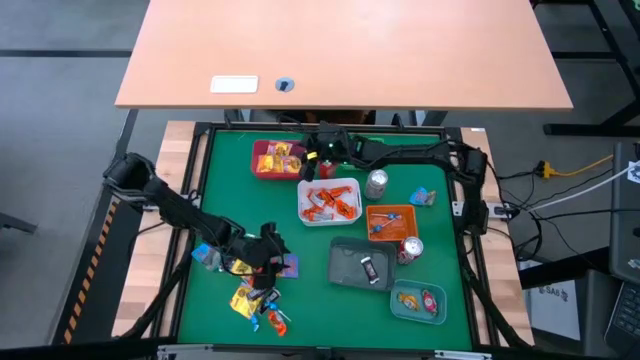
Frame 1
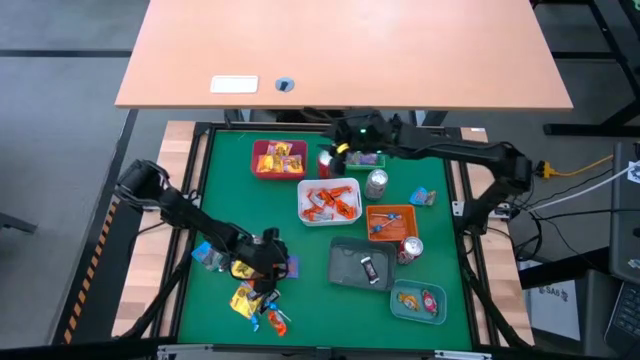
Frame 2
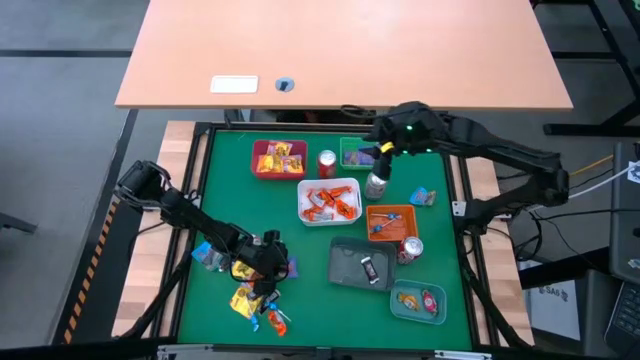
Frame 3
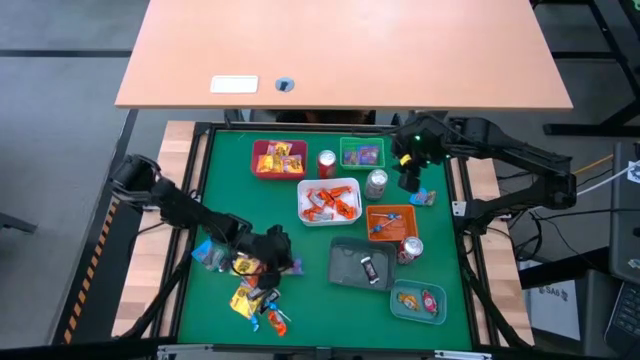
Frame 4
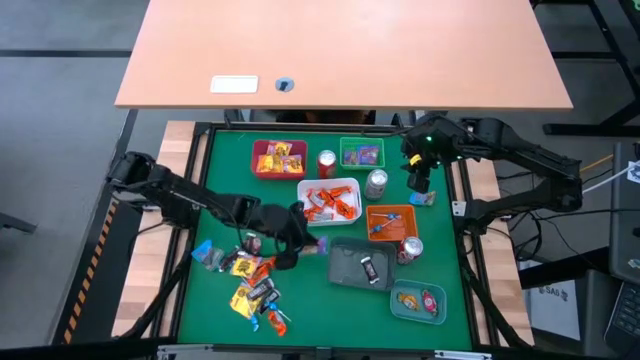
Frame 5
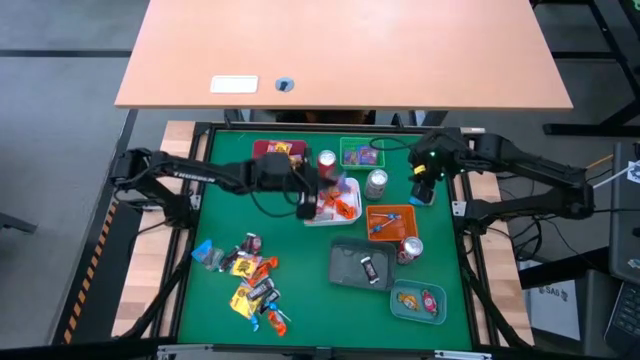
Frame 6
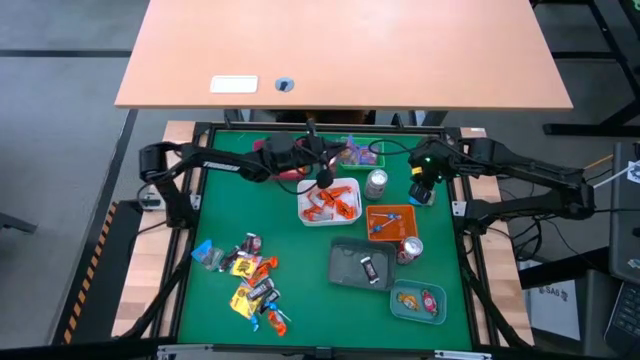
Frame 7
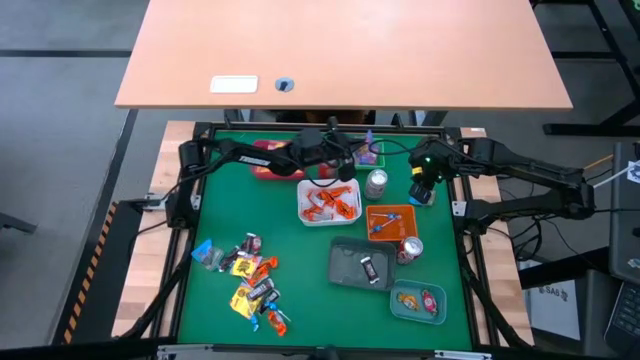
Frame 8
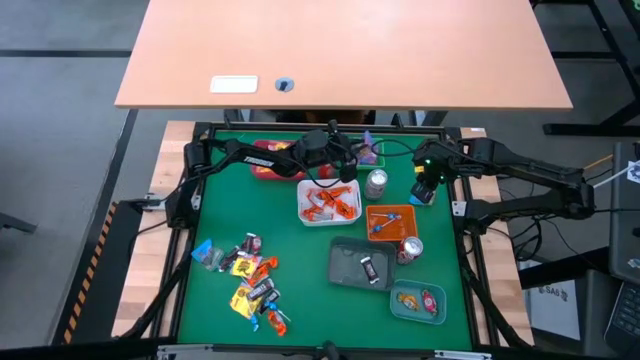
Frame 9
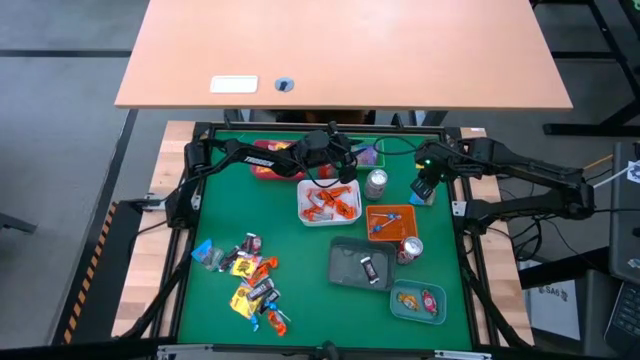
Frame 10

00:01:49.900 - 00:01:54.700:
Task: Sort candy
Put the violet candy into the green bin

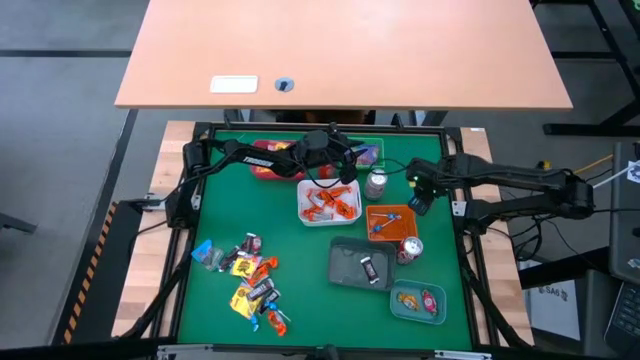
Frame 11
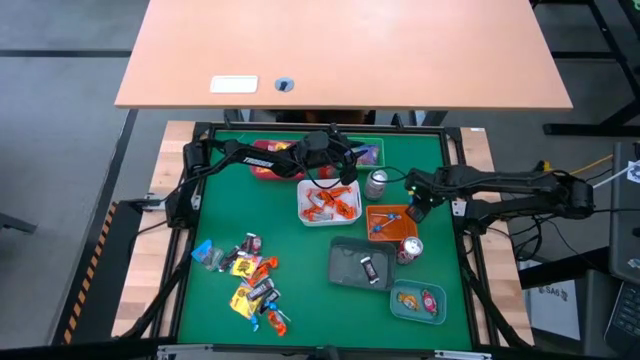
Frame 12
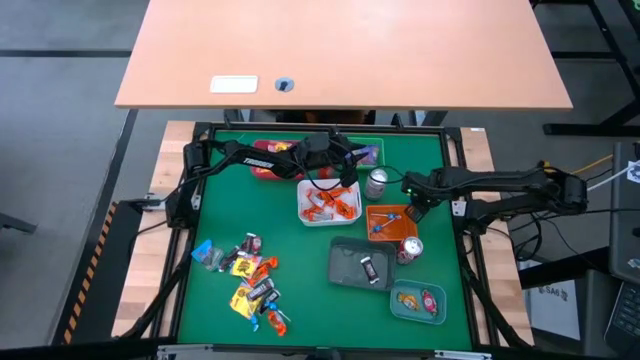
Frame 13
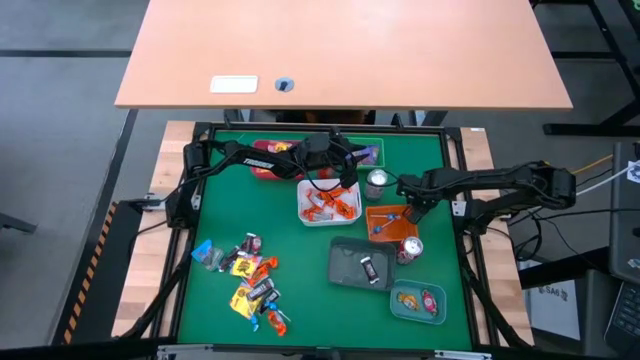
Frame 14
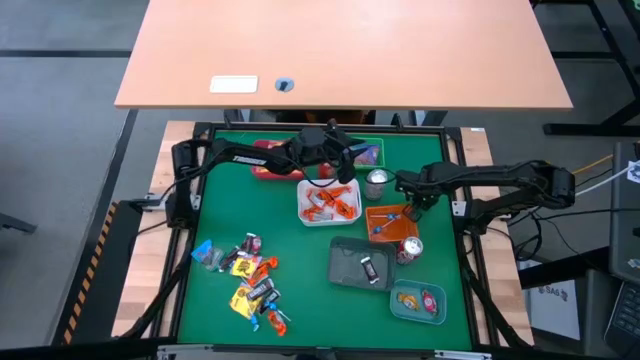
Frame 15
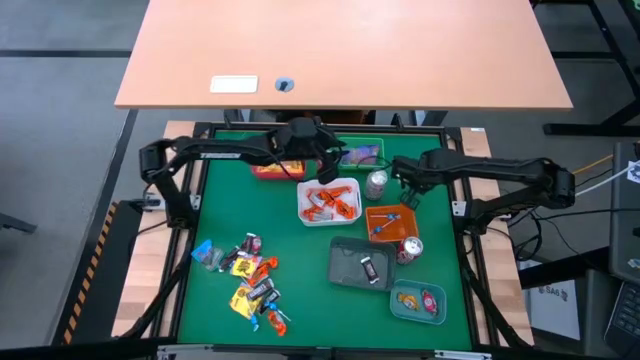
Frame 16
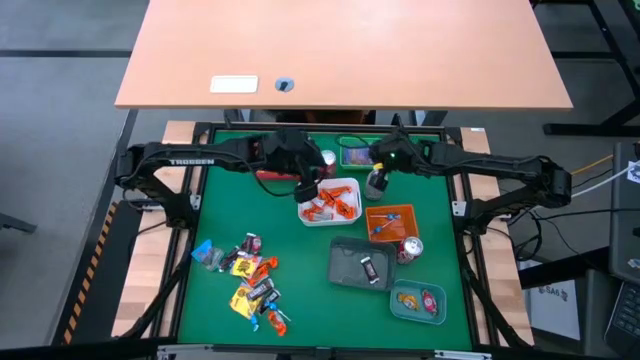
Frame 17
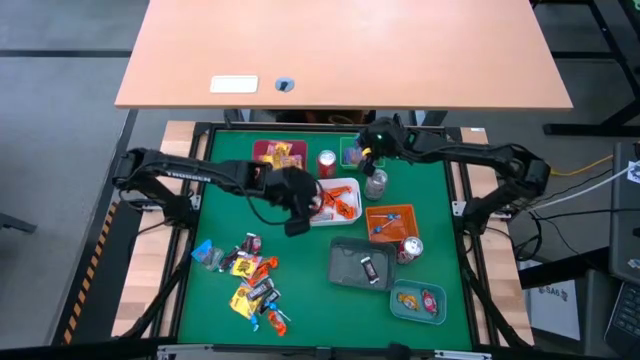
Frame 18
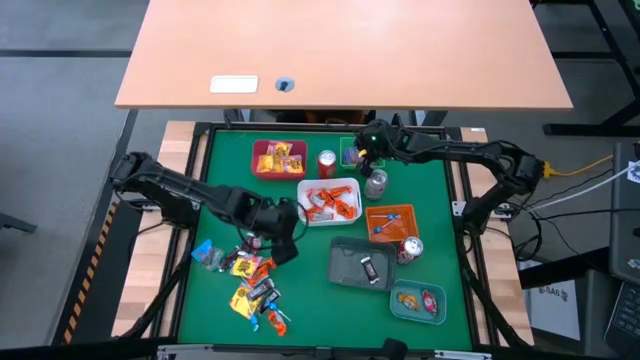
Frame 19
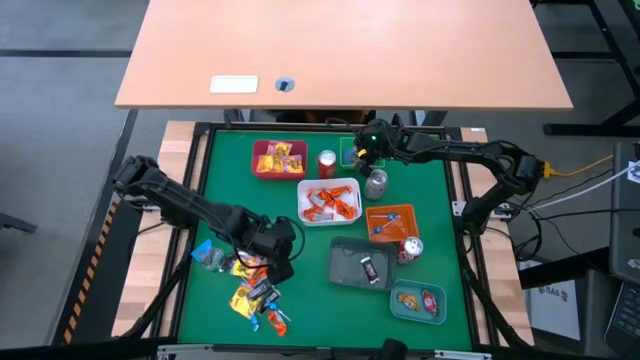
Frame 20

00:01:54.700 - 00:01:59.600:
Put he blue candy into the green bin

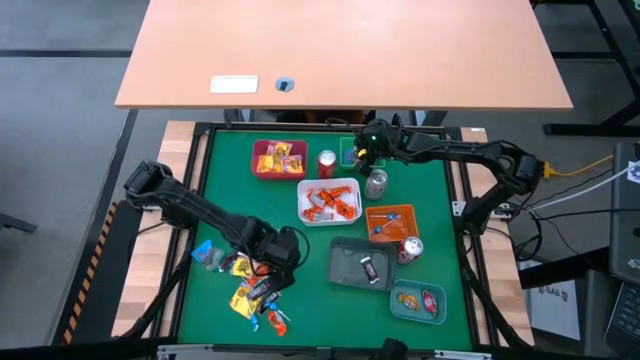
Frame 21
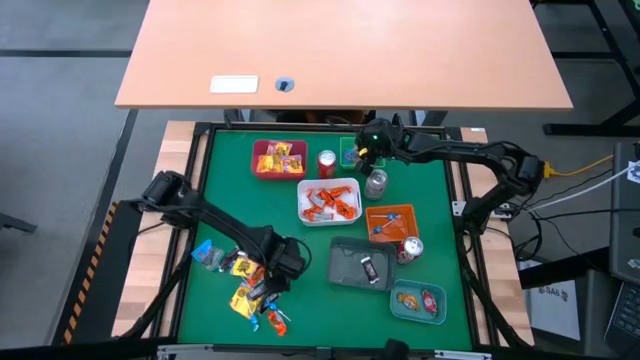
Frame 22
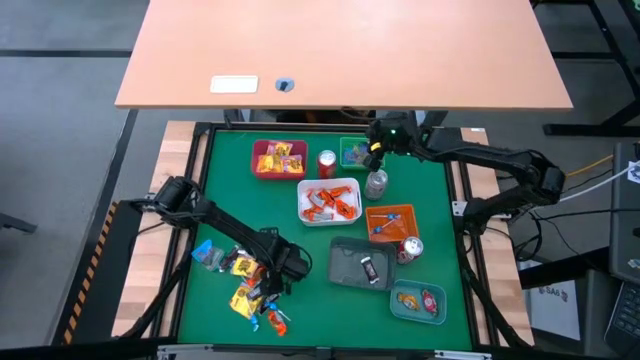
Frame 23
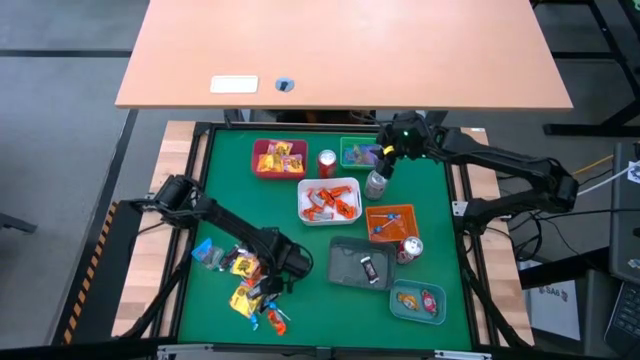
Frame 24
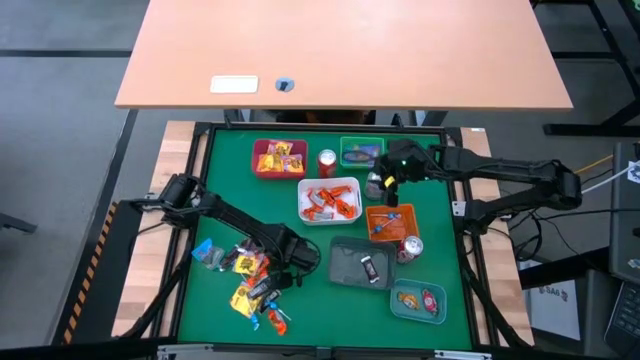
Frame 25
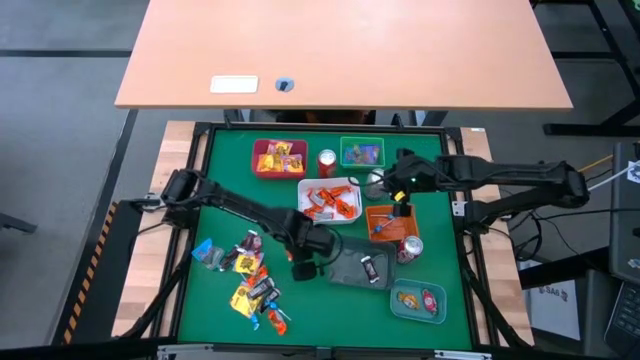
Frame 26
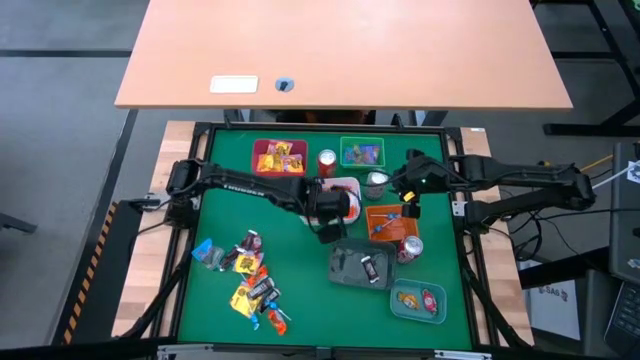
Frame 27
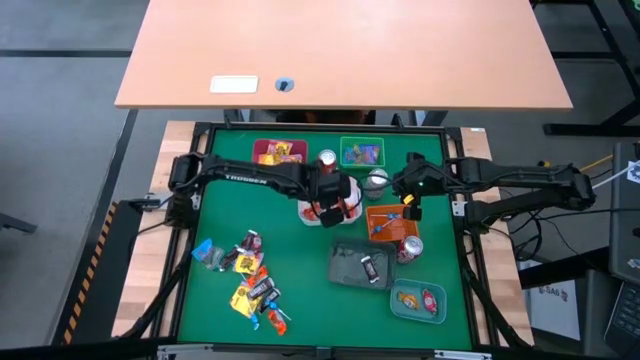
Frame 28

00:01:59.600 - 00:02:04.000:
Put the orange candy into the white bin

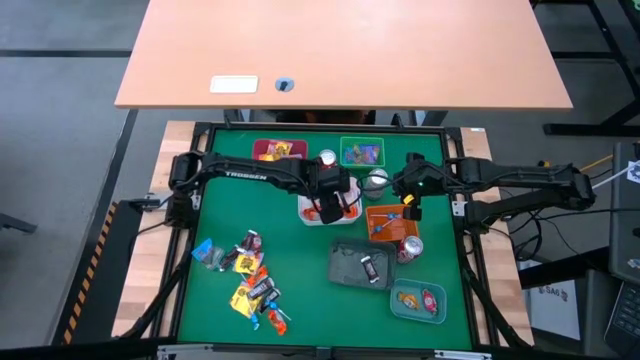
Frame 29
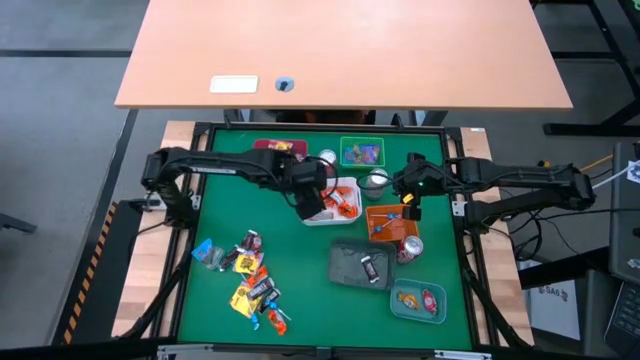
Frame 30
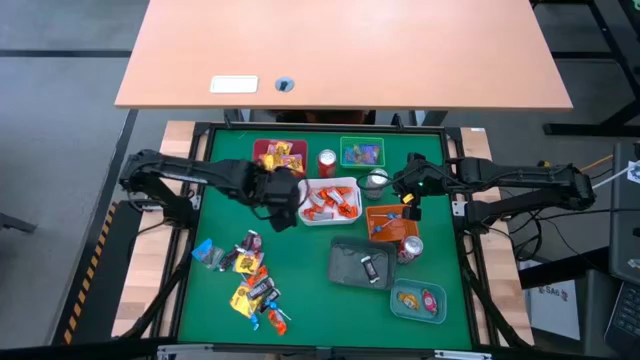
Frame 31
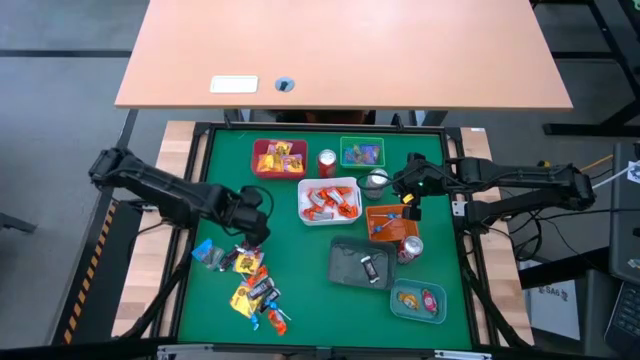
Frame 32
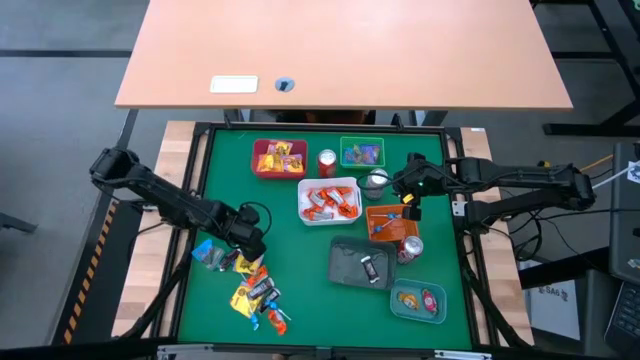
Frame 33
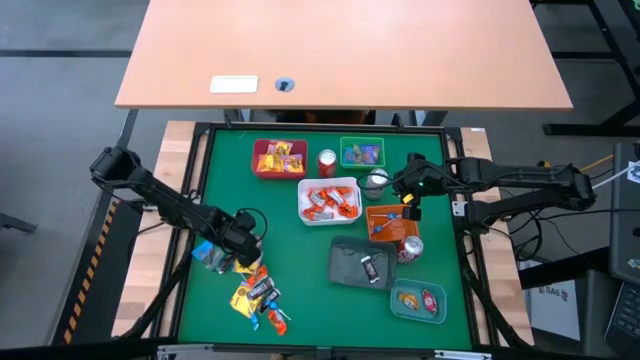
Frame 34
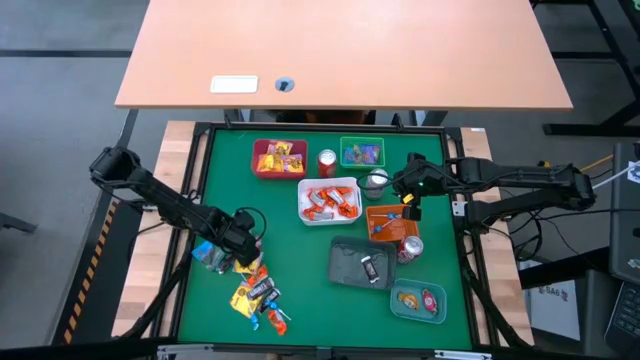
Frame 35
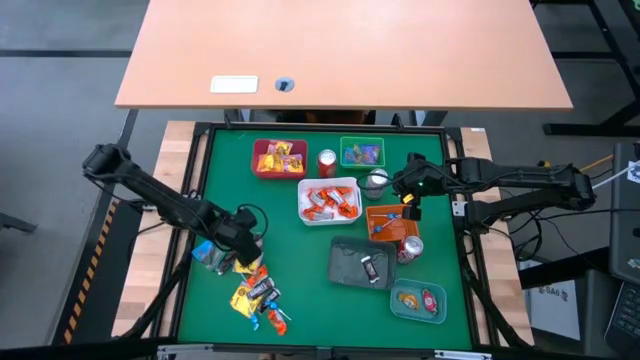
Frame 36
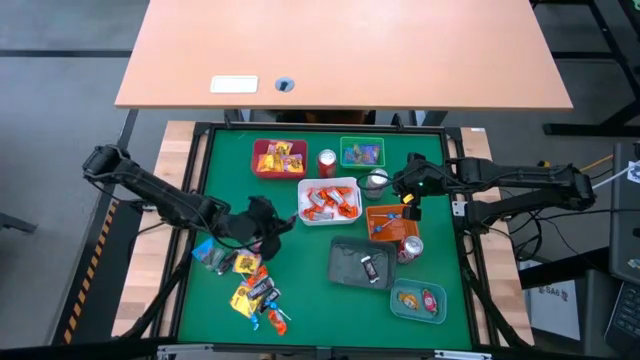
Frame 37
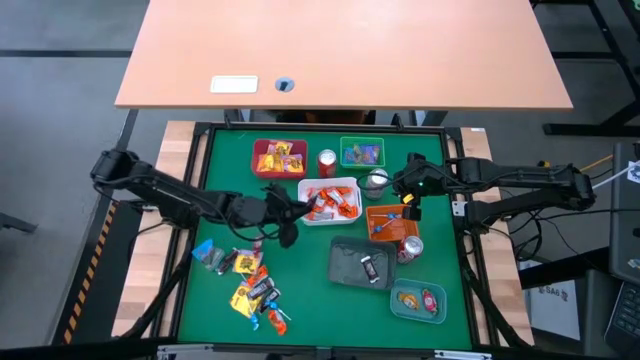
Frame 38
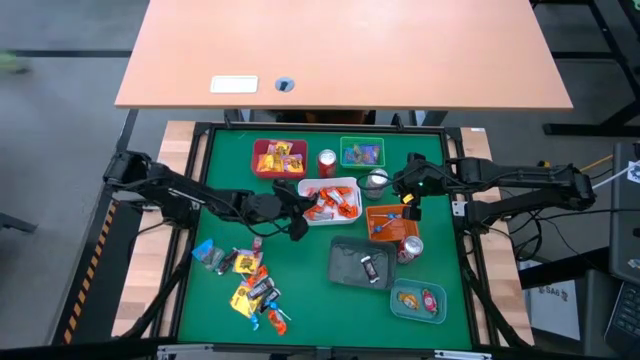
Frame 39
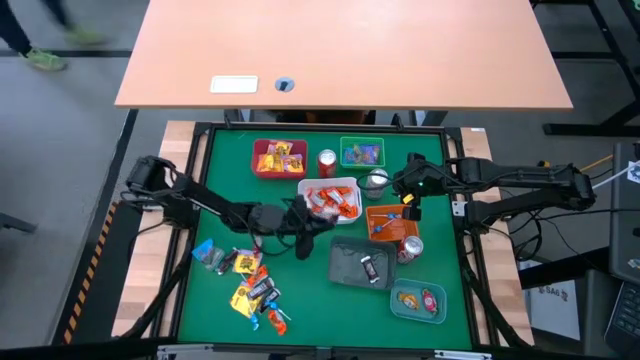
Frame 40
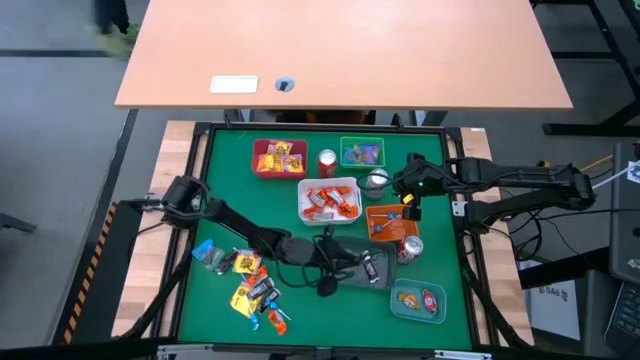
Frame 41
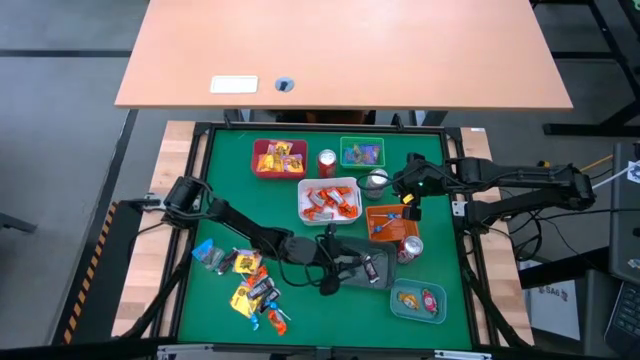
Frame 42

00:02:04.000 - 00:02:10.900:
Put the brown chocolate bar into the black bin

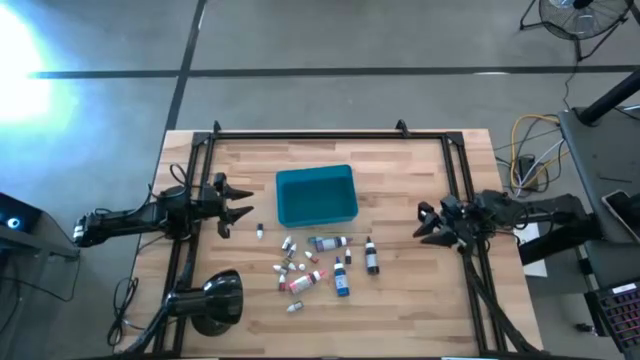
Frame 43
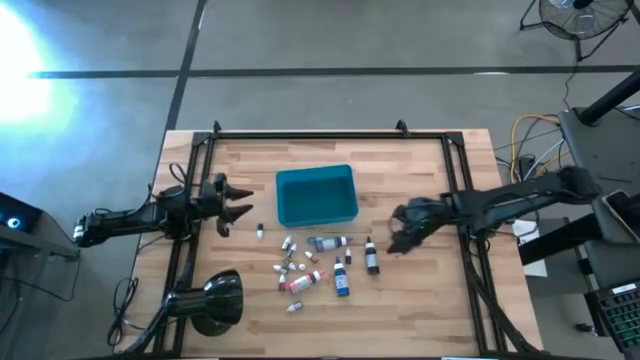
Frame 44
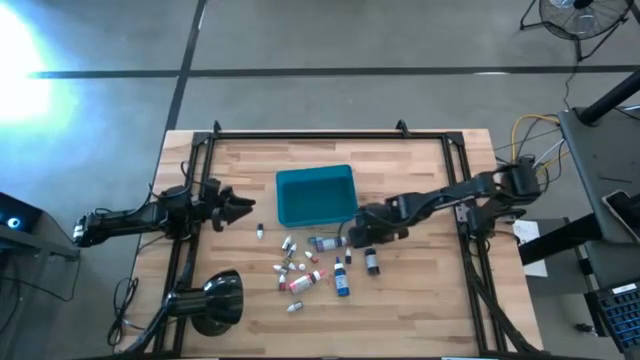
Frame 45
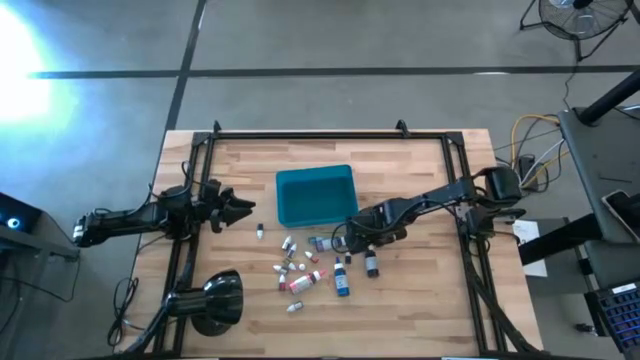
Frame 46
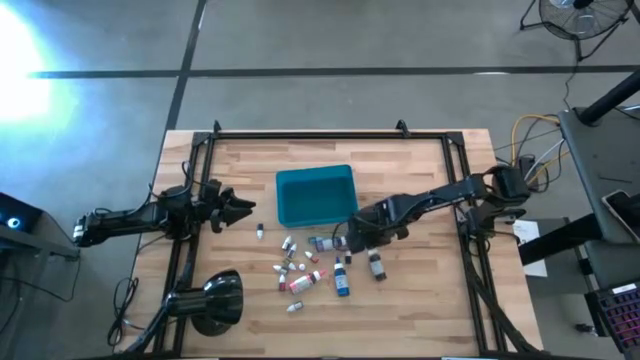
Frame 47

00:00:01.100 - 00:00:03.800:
Task: Pick & Place food coloring
Put the large black food coloring bottle into the blue bin
